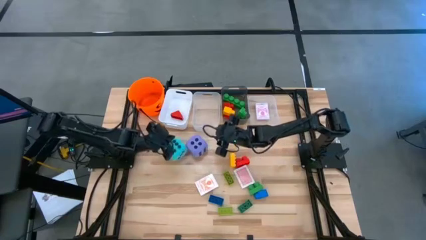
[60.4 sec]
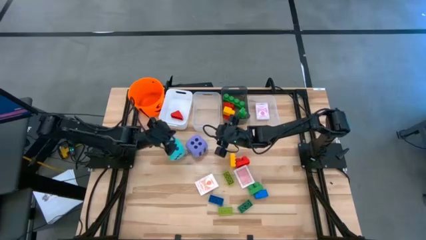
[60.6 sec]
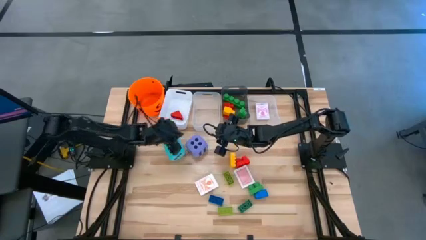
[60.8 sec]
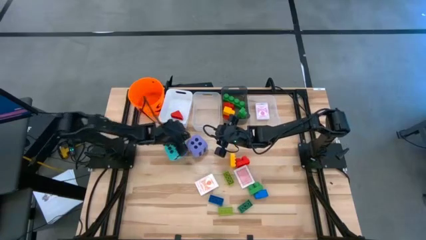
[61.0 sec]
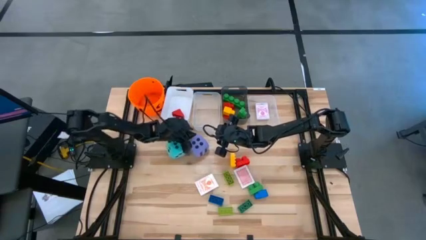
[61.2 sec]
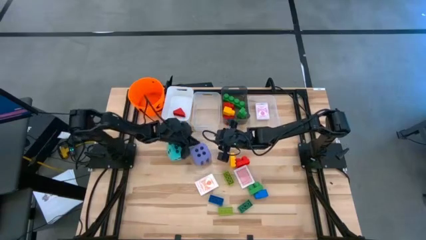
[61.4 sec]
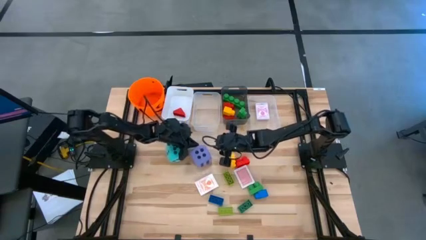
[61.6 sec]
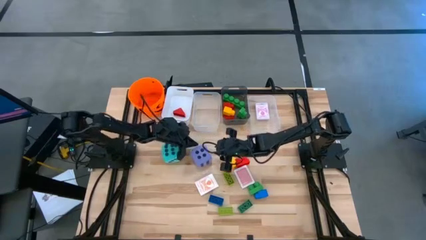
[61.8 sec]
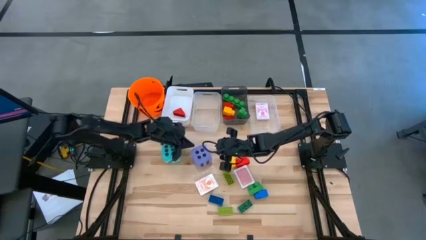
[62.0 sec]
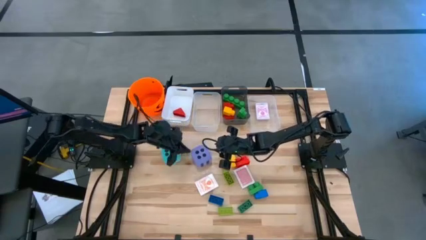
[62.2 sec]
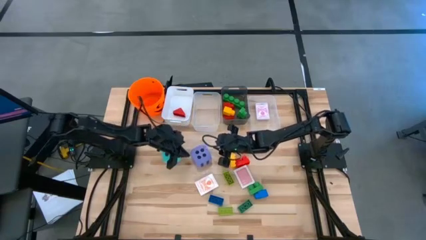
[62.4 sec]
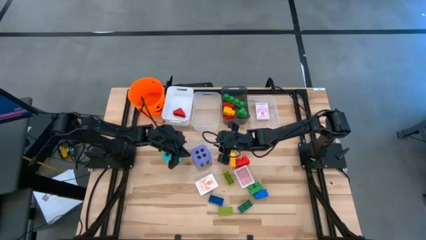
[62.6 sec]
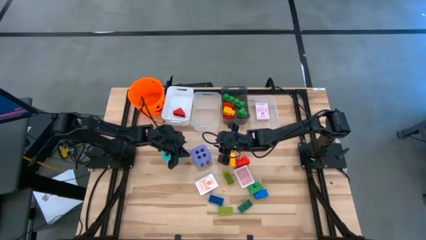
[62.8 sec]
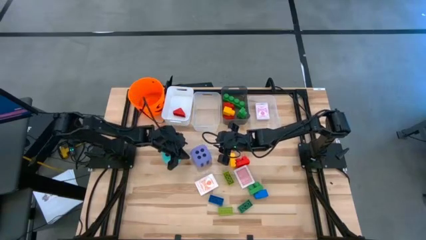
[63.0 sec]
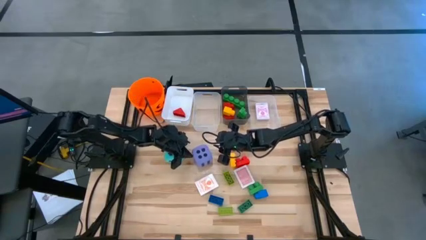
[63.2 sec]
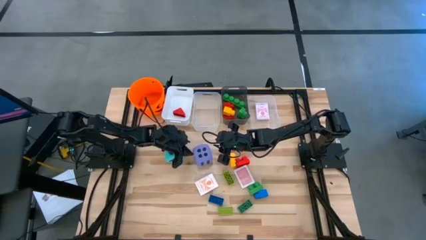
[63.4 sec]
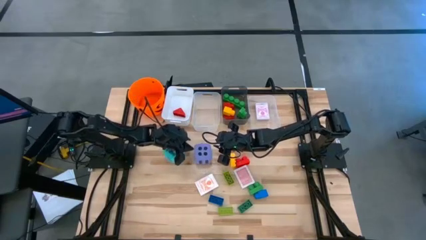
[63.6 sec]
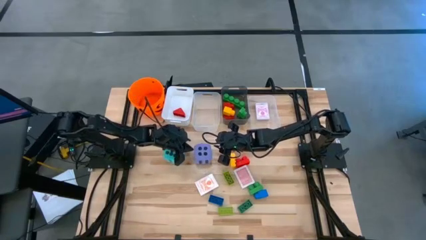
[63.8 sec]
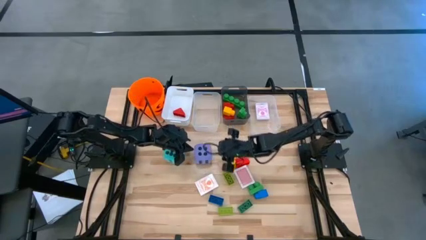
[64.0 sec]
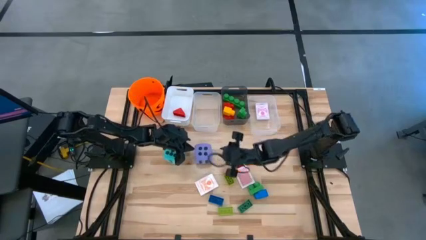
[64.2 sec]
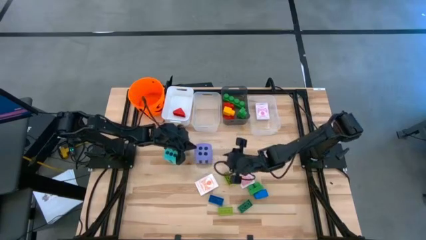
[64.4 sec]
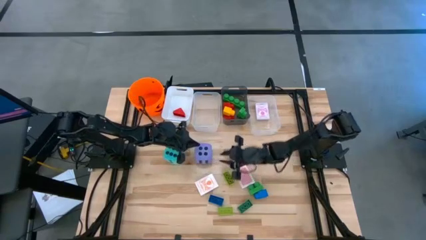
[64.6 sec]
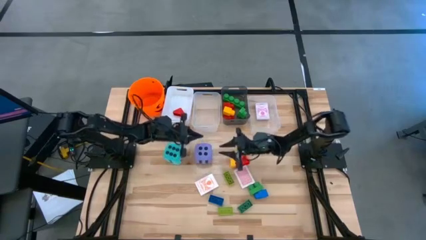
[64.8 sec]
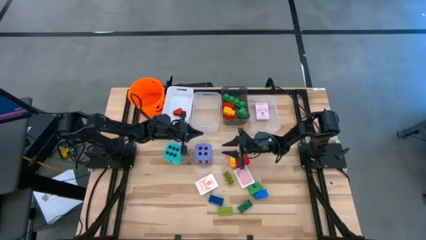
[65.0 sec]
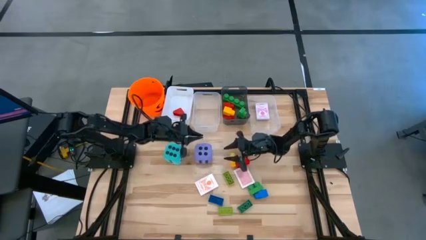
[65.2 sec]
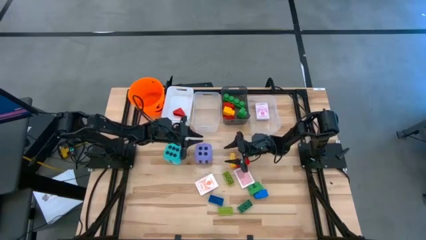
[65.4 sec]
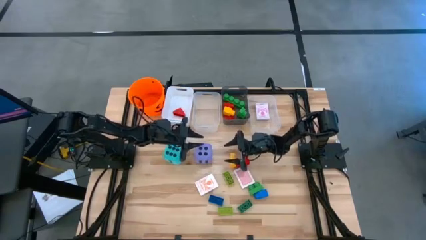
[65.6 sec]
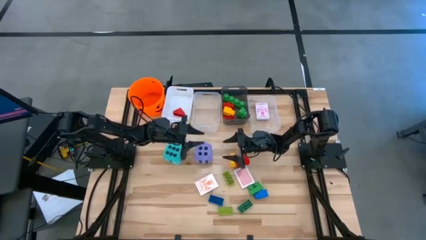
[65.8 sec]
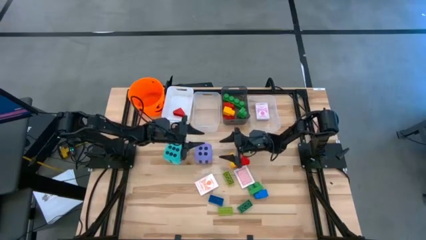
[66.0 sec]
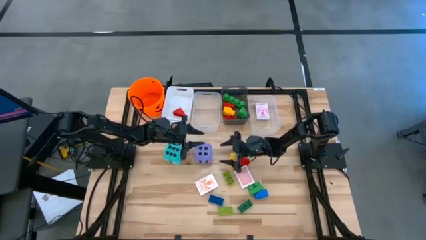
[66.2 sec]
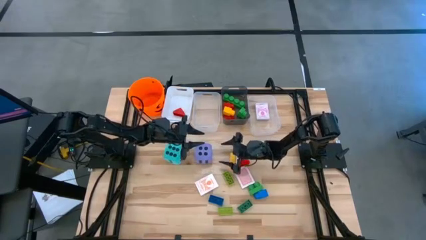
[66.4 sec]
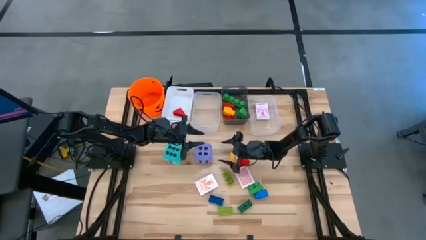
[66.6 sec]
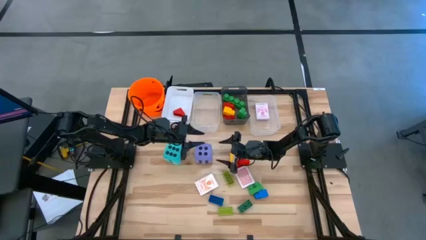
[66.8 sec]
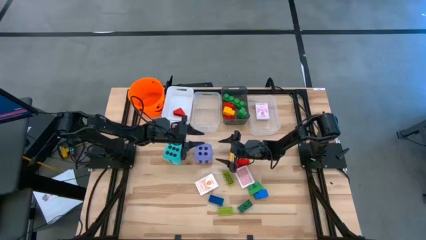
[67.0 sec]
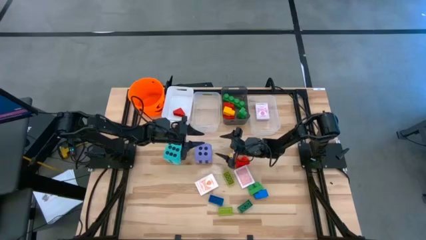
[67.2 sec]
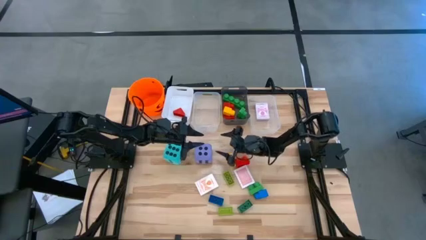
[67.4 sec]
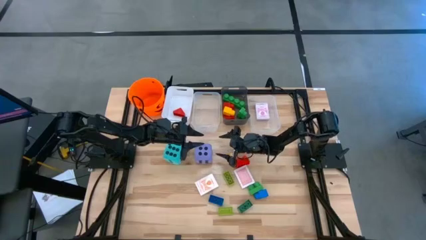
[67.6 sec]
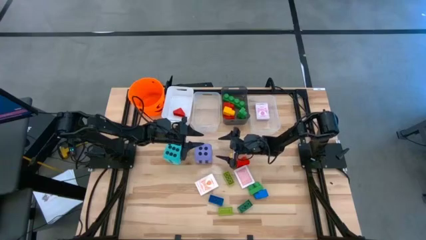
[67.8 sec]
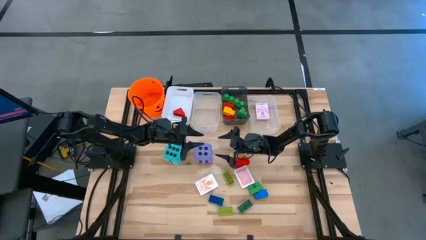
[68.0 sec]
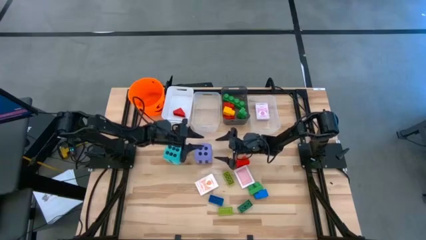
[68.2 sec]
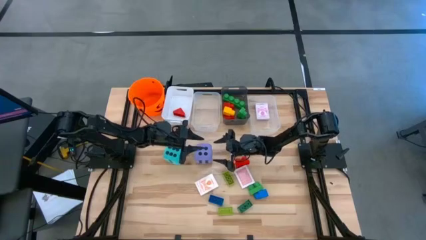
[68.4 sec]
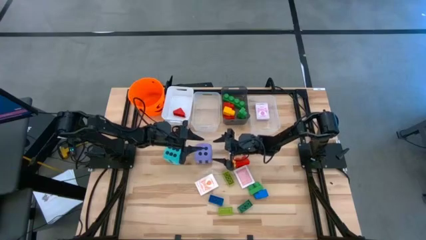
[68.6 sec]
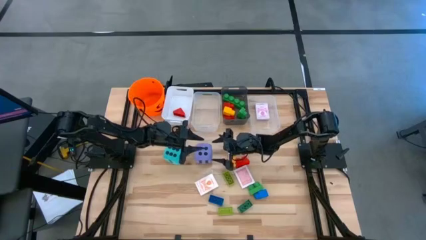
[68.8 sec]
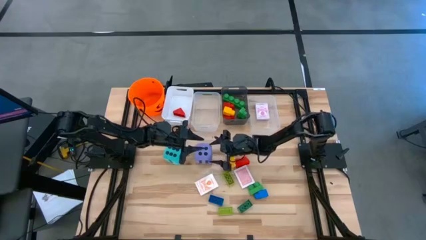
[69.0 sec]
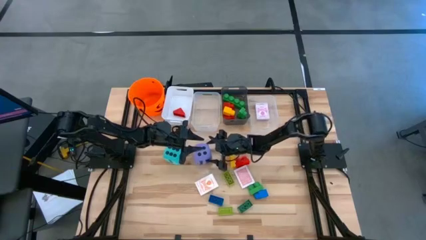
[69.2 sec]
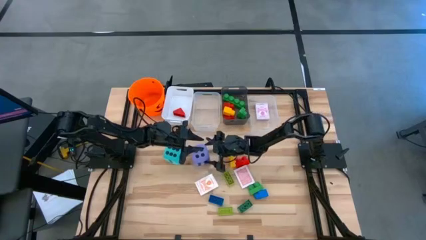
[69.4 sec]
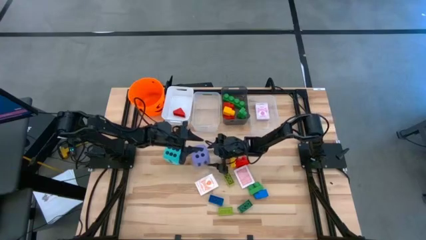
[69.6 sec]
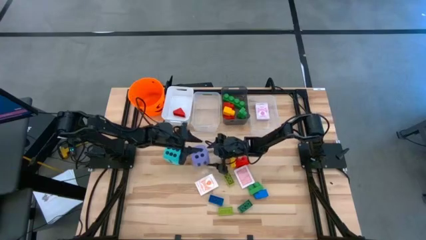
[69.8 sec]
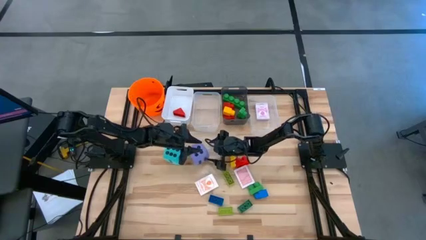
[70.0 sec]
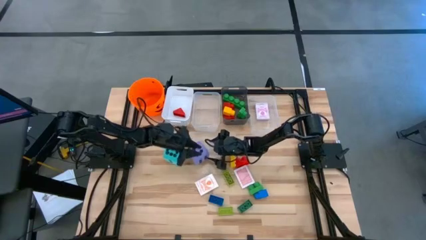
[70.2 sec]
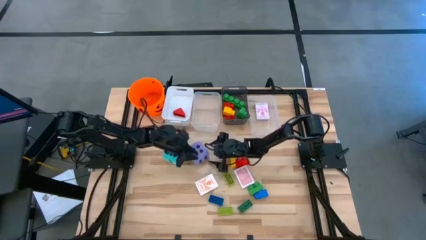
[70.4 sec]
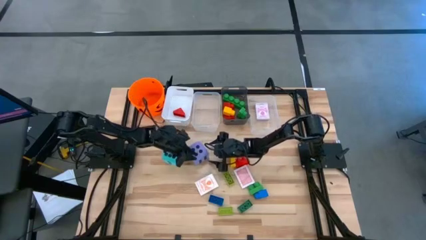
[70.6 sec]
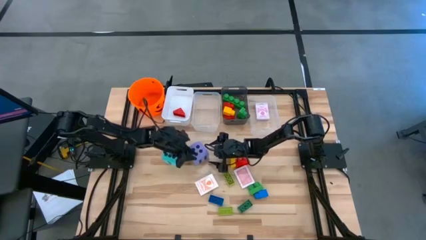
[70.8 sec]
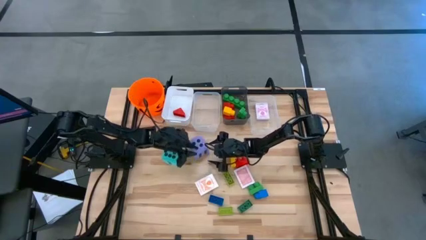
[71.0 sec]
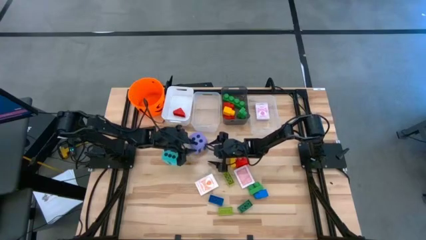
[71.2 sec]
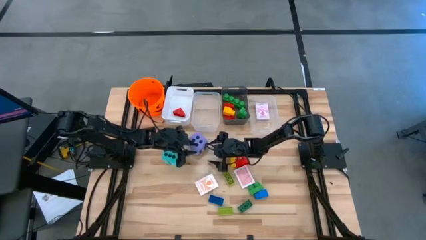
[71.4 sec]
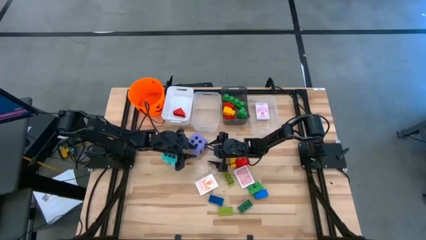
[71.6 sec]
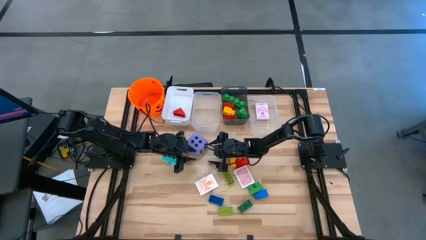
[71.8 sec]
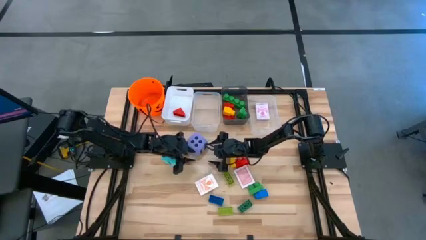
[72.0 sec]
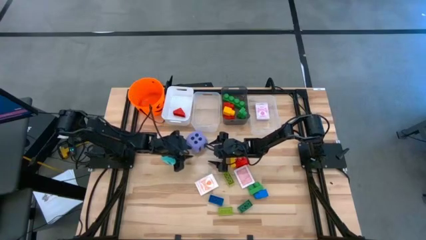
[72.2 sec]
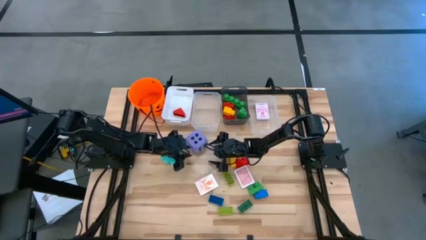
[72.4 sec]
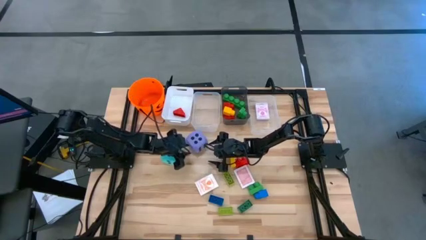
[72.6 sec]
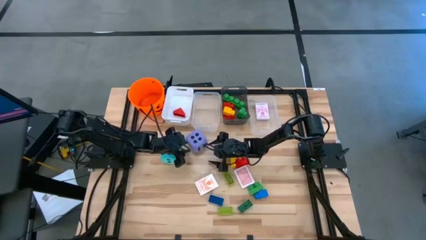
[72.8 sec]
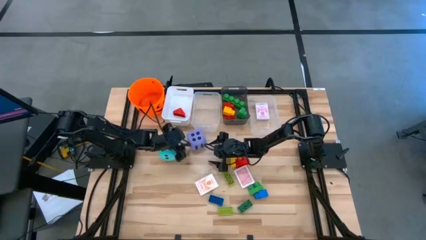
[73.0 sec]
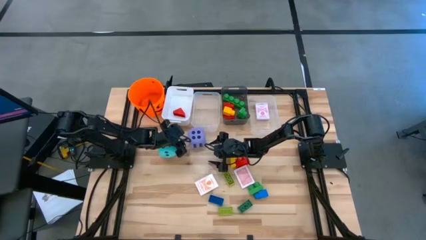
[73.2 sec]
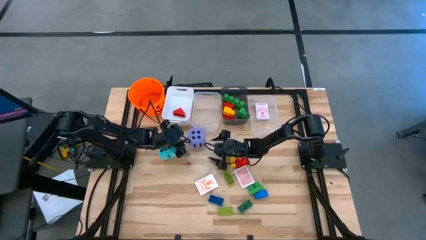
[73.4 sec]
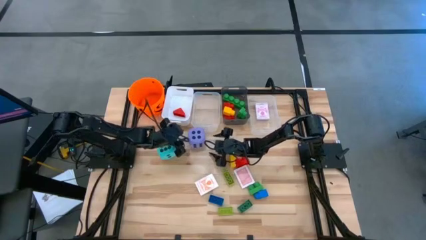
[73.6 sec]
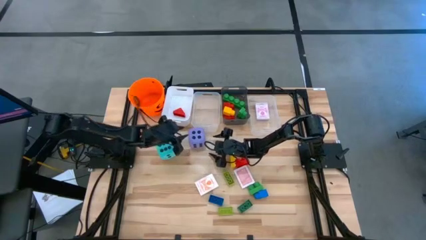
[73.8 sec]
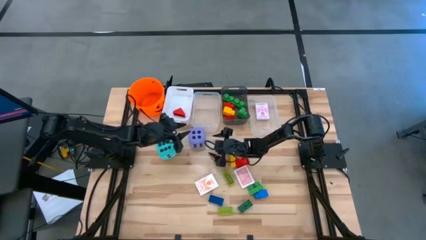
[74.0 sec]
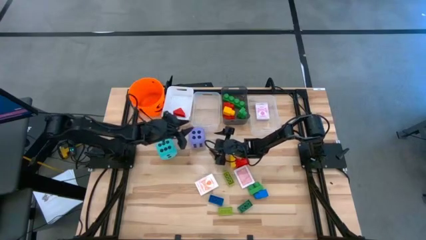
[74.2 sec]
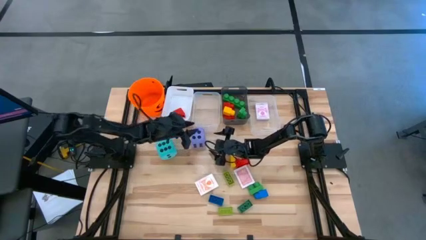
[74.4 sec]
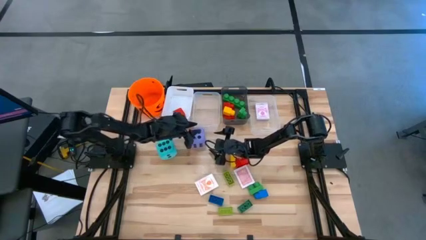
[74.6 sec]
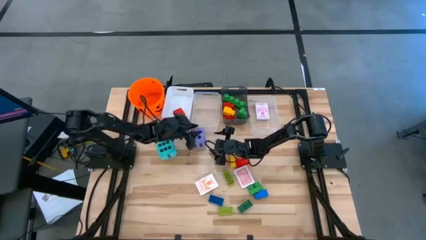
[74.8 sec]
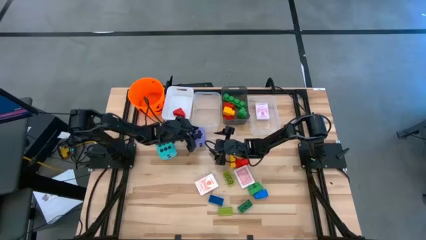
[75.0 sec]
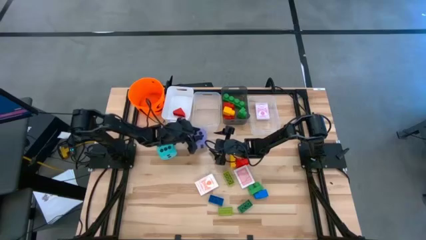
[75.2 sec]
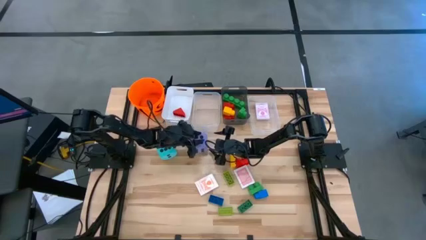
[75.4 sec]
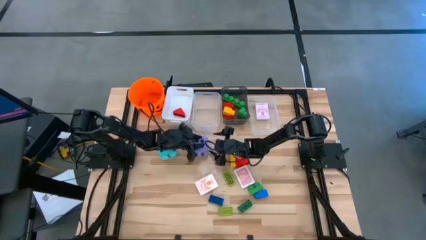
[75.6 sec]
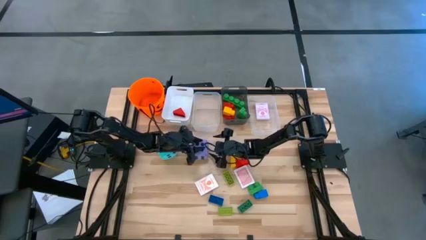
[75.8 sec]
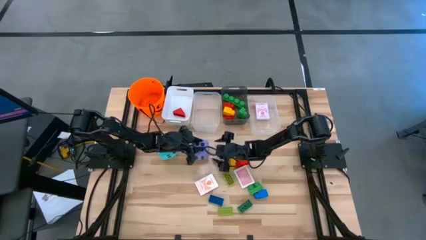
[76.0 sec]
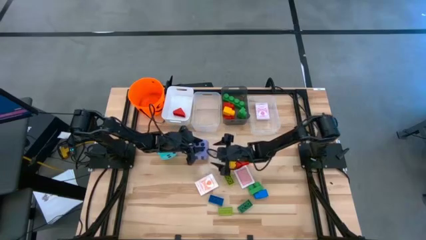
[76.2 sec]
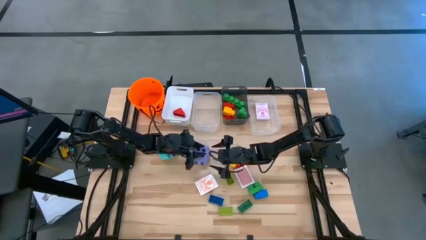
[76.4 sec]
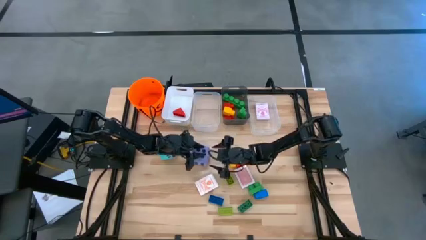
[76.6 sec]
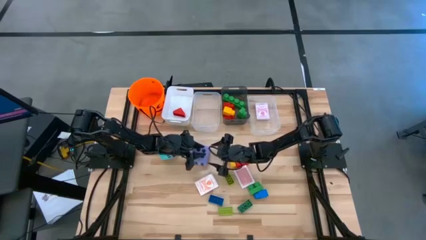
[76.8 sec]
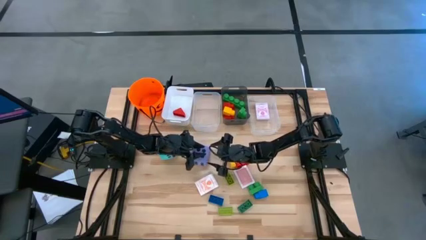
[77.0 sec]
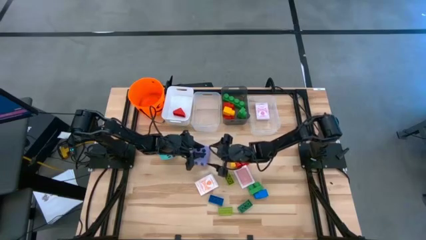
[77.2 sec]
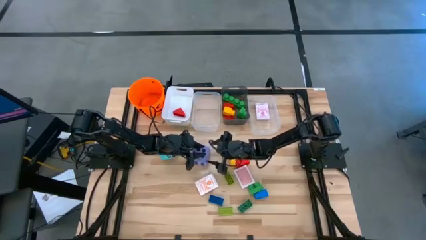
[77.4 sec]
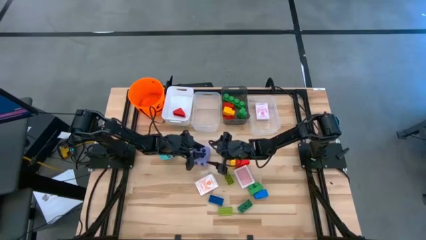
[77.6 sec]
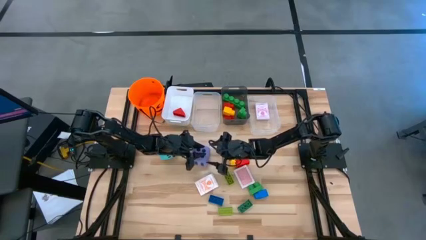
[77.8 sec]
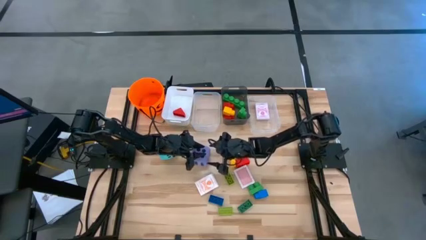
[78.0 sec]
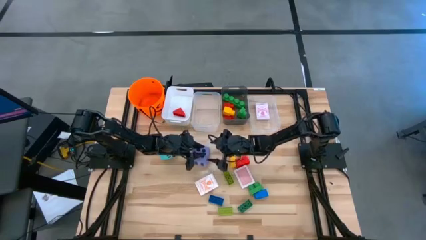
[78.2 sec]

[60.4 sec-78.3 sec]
Task: Pick & Place Toys
Put the large violet dice into the left transparent bin
